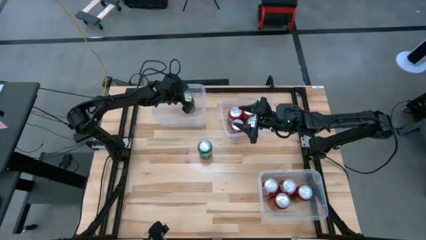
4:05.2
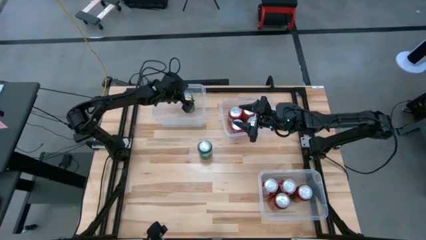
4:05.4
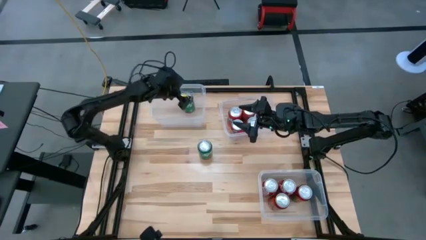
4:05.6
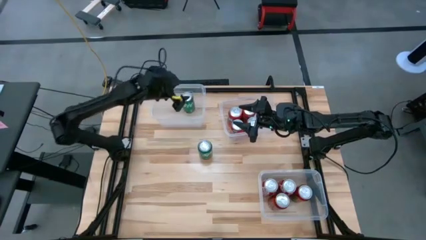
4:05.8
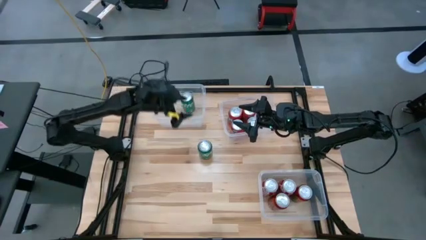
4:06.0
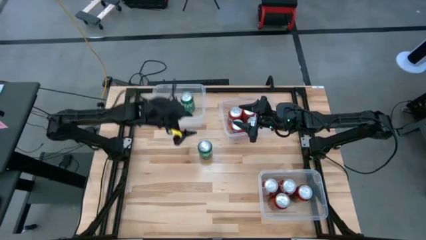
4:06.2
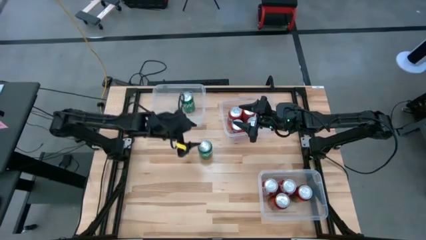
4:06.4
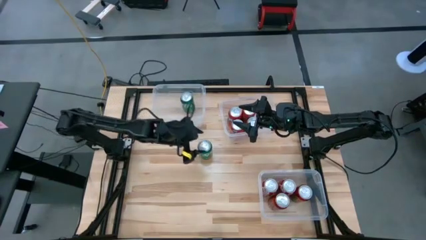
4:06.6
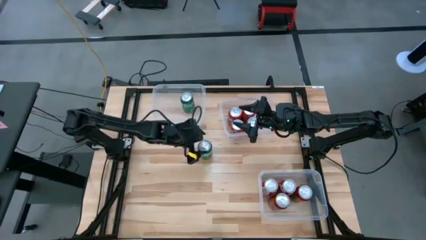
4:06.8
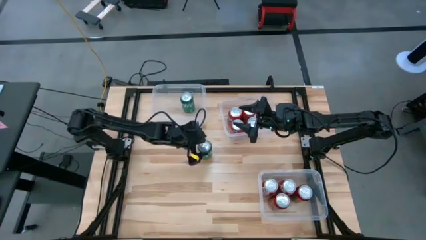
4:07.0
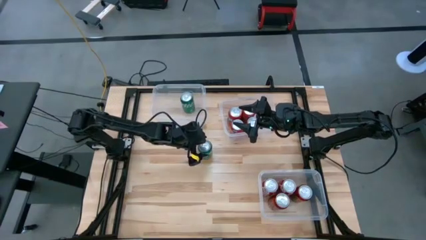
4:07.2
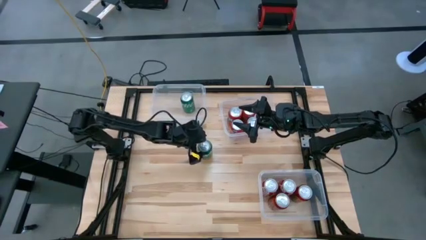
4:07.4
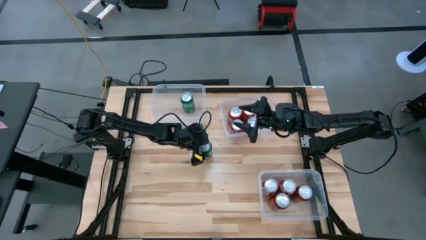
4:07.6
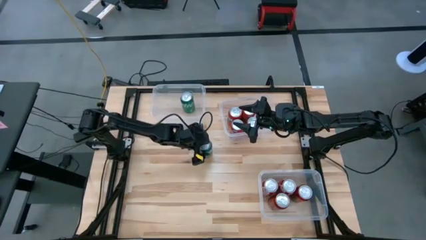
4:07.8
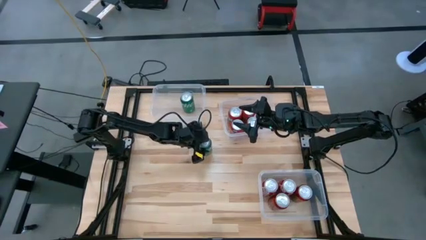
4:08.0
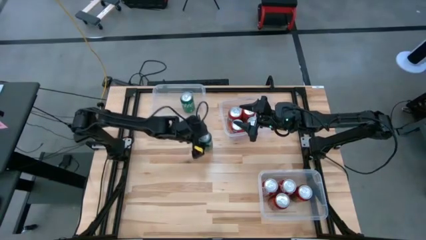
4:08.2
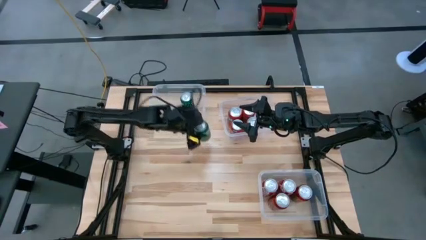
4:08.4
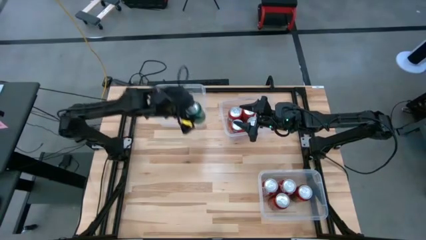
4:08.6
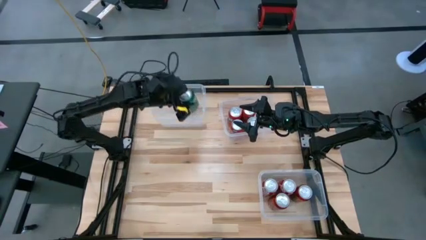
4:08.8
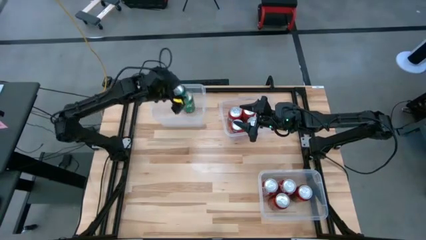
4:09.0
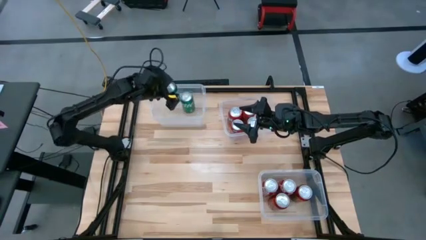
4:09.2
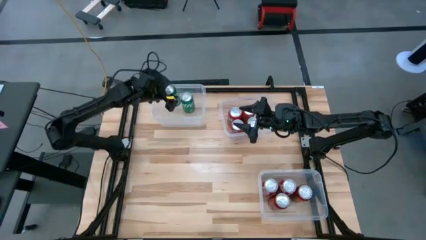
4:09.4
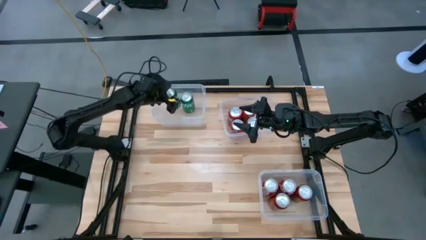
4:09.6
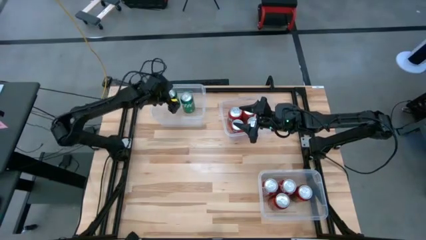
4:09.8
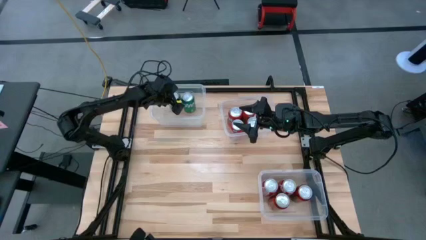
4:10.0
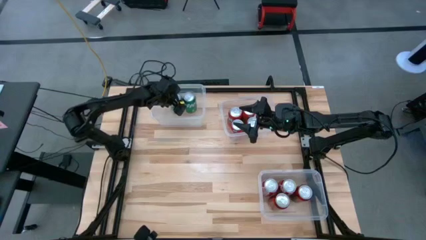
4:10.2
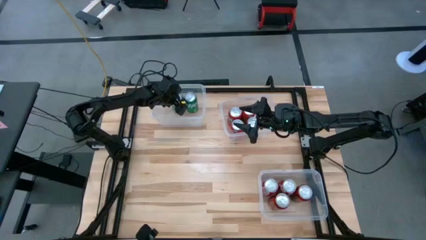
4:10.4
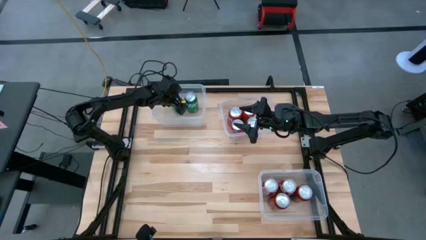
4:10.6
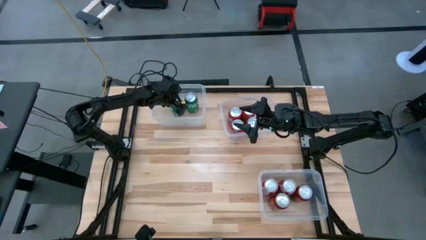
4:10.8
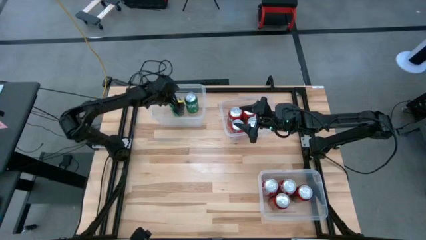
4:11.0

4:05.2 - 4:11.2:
Task: Sort soda cans
Put the green soda into the top left transparent bin

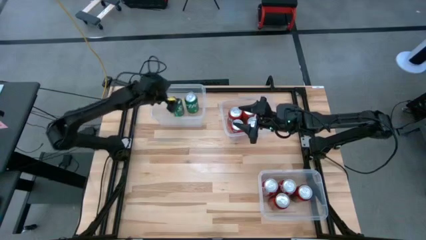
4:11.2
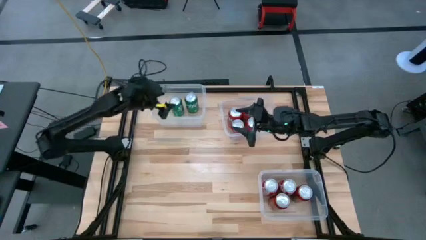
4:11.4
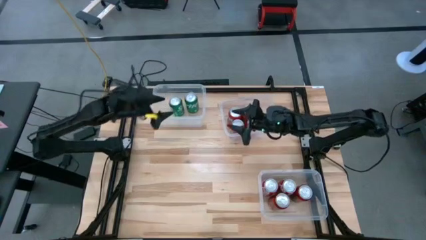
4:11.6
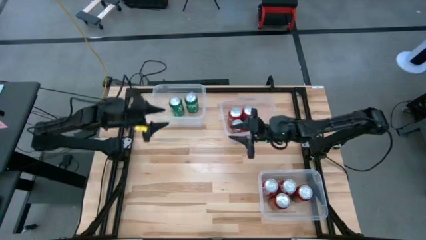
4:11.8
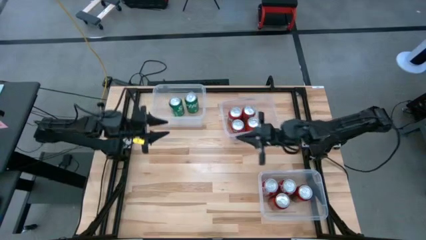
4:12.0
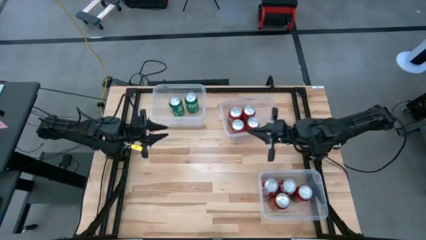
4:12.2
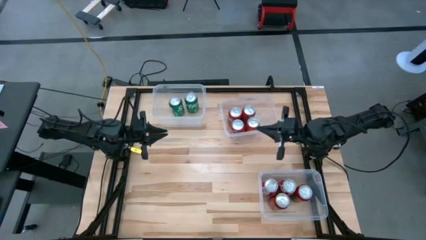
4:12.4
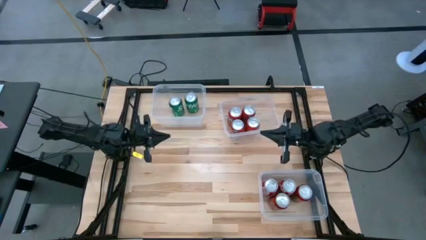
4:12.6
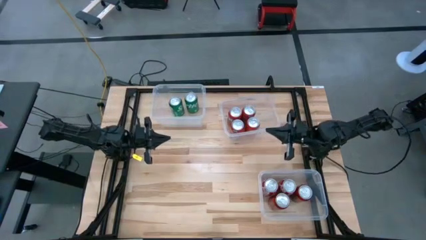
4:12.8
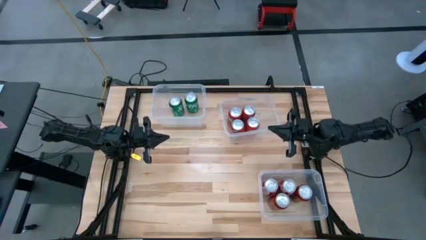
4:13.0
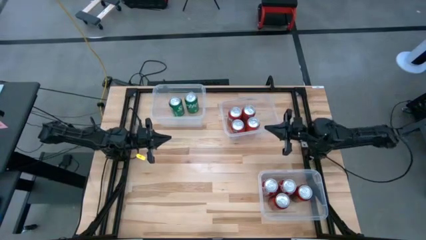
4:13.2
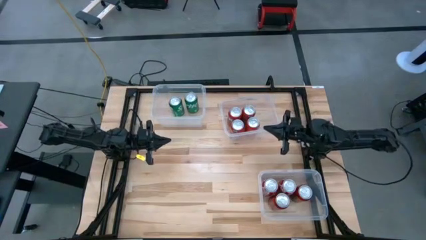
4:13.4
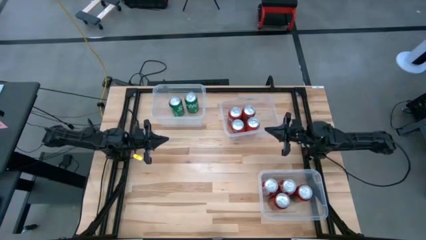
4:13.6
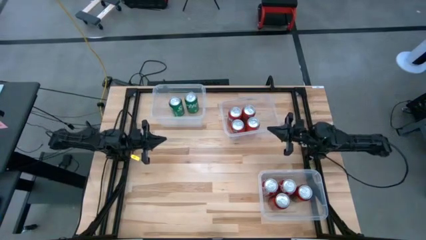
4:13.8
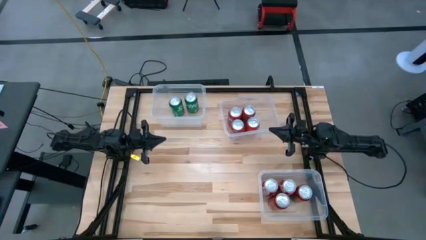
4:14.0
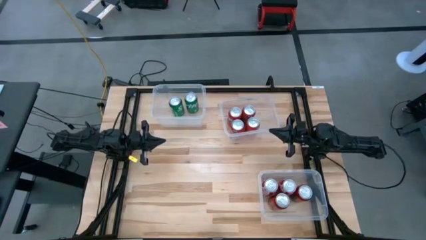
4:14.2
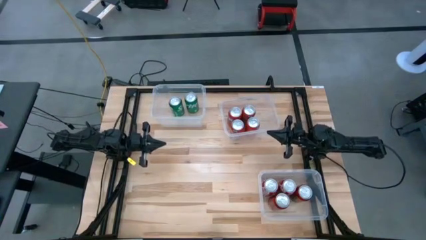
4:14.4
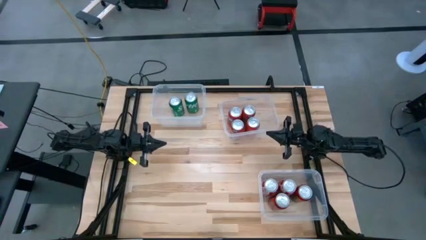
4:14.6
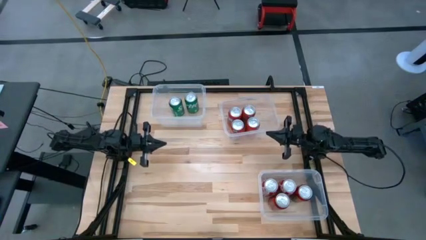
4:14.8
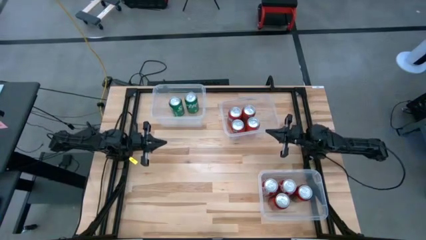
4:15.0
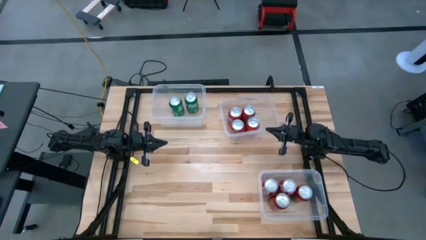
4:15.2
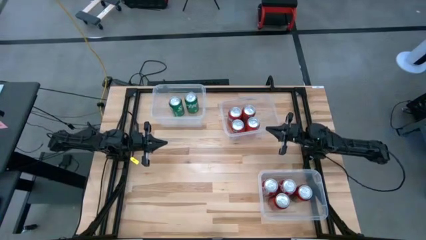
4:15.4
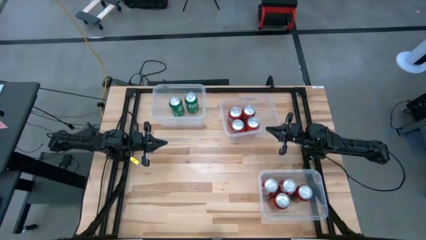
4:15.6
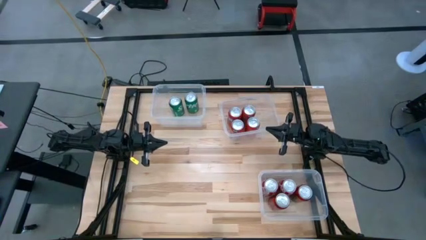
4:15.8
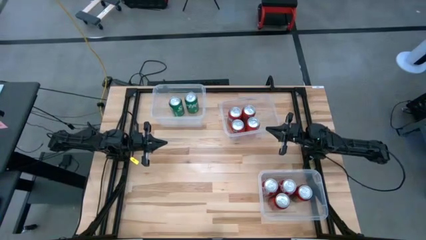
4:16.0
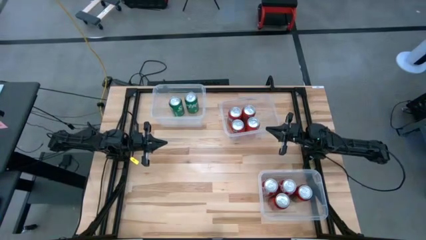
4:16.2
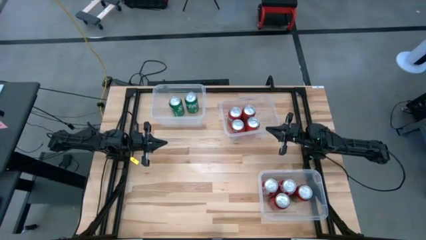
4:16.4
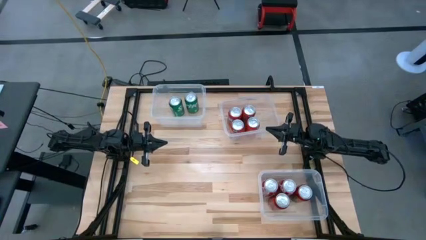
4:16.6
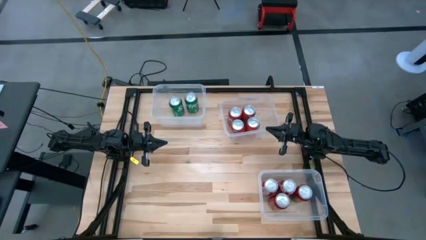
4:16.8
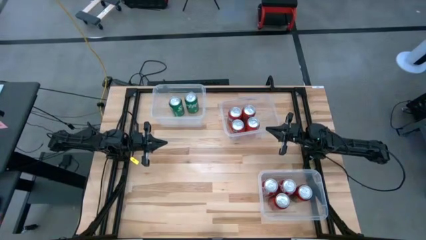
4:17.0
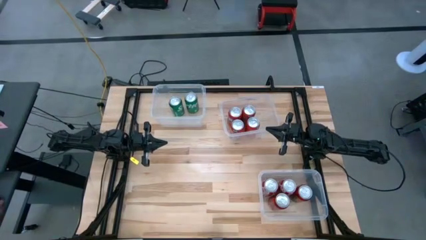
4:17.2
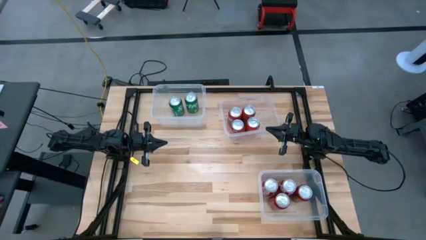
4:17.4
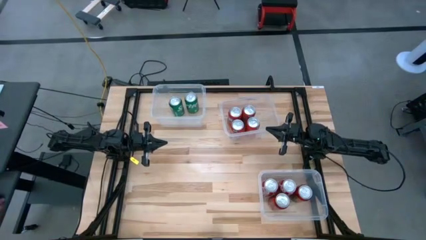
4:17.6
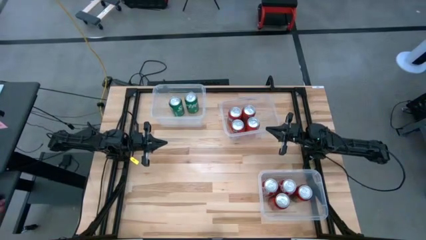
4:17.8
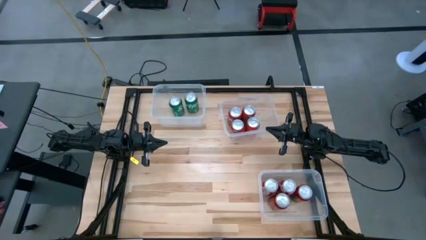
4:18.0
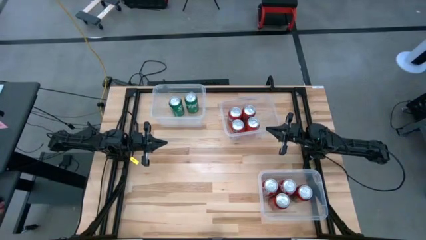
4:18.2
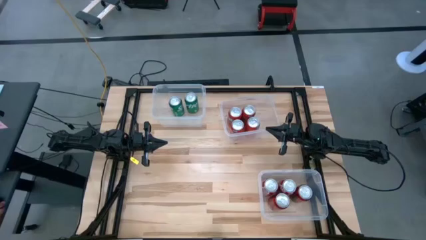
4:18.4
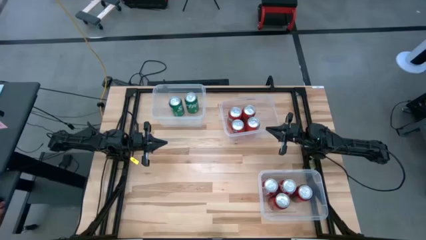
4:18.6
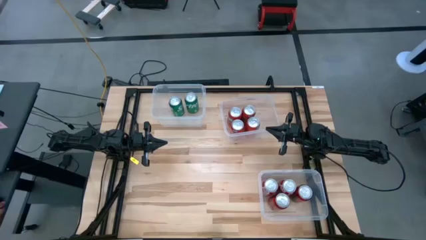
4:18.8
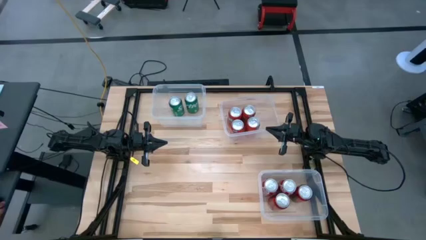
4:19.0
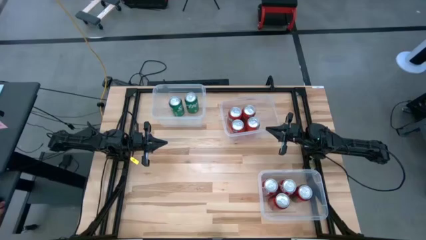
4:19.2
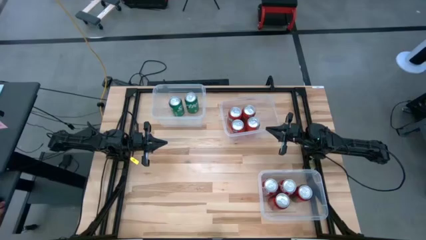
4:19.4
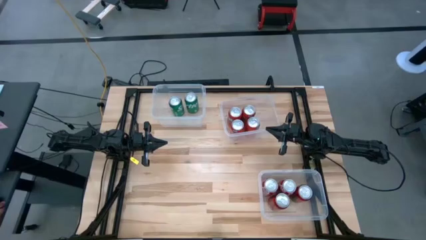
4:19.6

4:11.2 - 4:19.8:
Return to Home Position

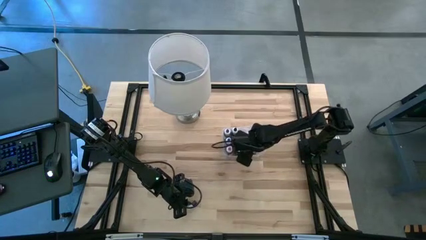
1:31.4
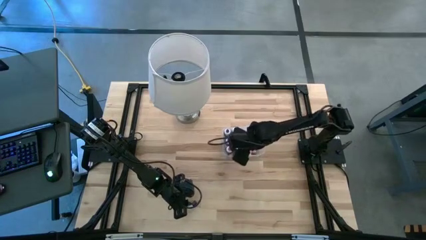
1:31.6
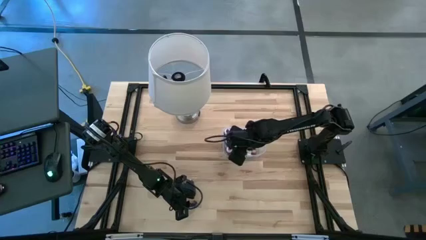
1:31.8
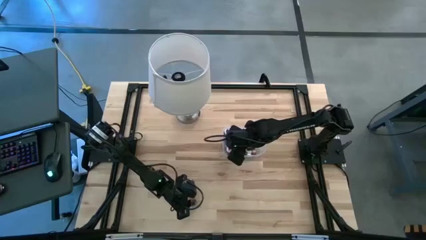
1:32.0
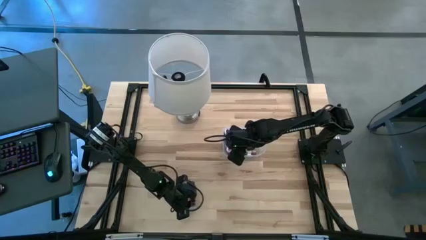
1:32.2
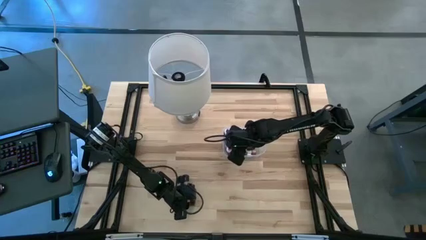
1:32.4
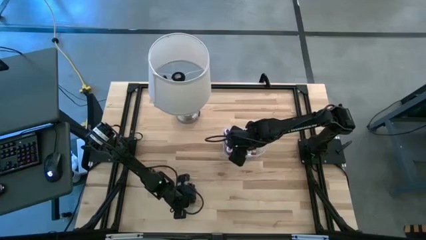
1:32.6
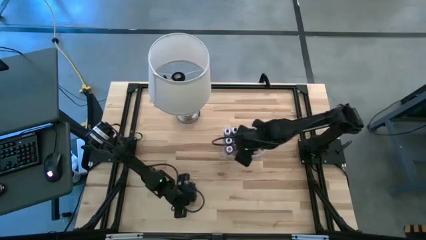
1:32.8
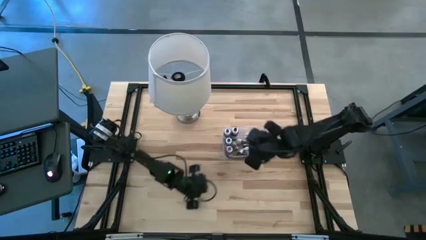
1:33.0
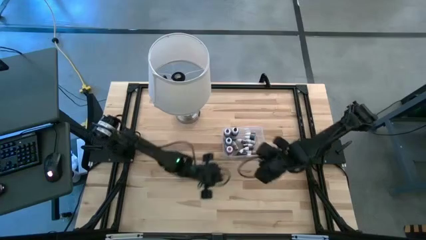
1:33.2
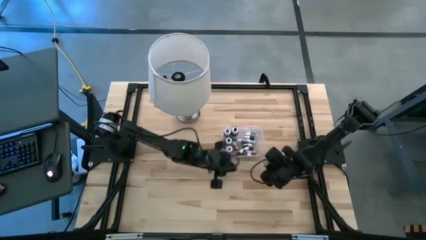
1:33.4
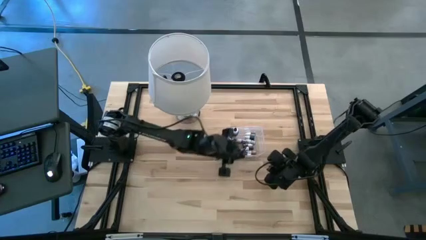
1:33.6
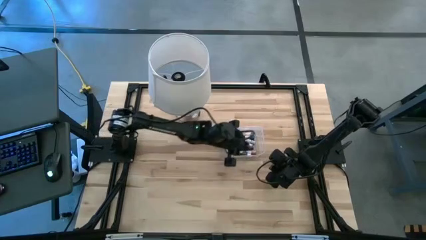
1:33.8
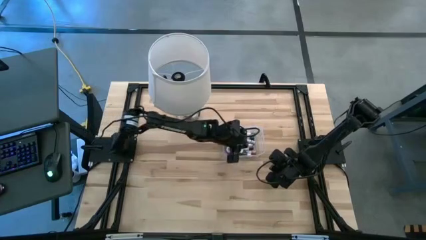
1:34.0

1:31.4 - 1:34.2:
Task: Pick & Place food coloring
Put the small purple food coloring bottle into the transparent bin
